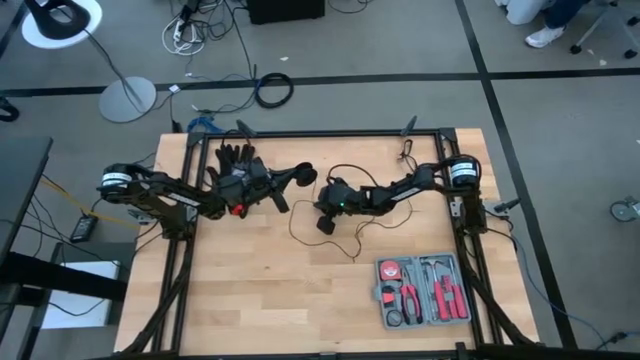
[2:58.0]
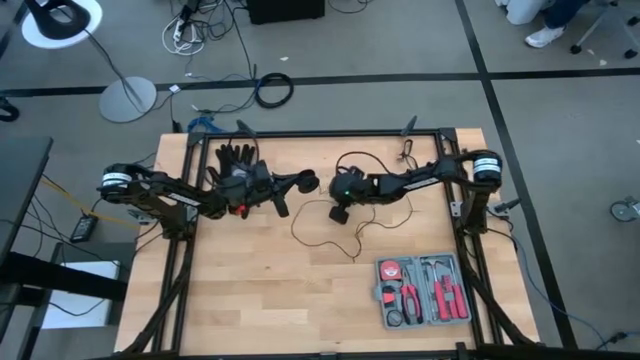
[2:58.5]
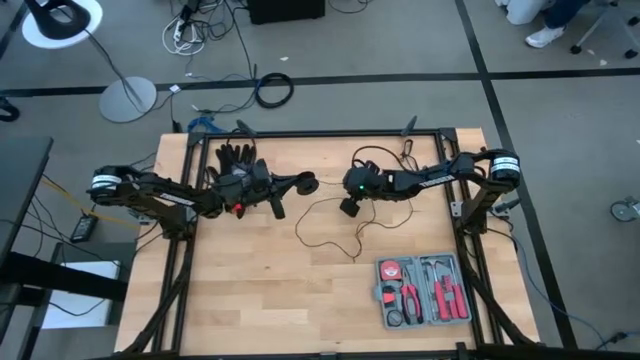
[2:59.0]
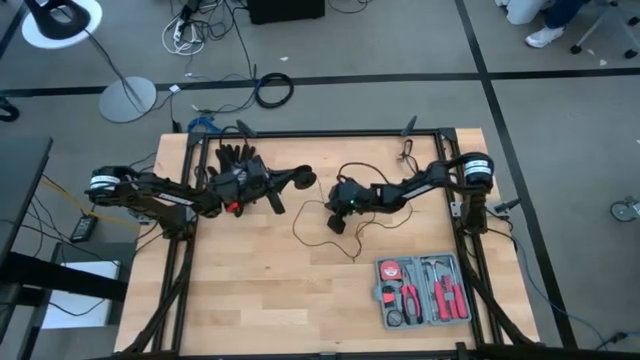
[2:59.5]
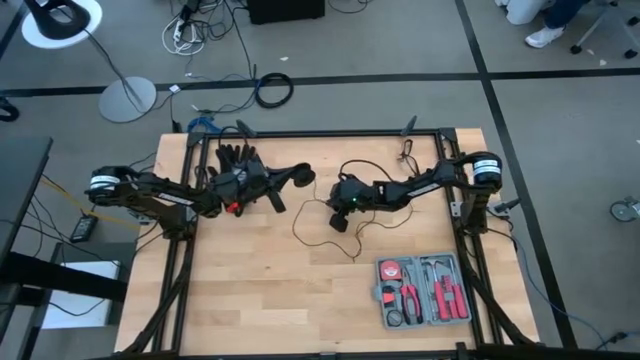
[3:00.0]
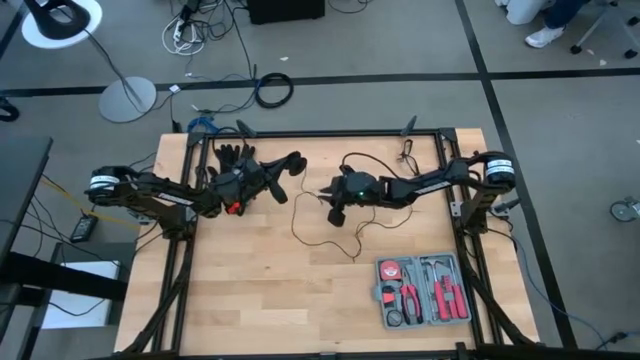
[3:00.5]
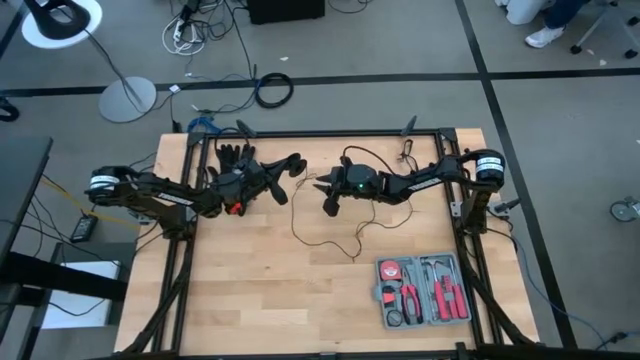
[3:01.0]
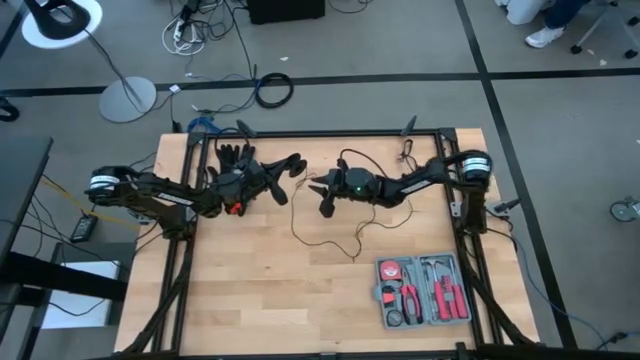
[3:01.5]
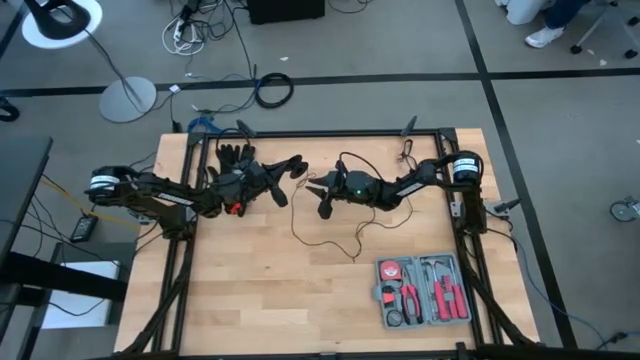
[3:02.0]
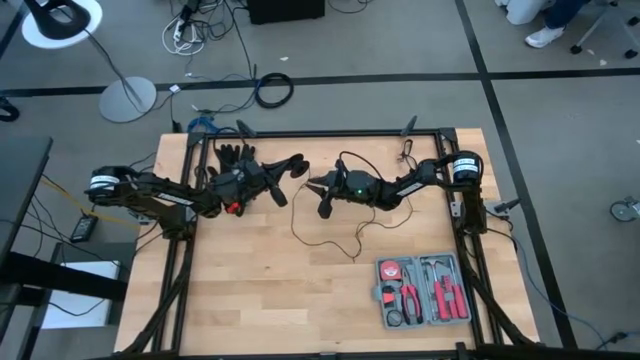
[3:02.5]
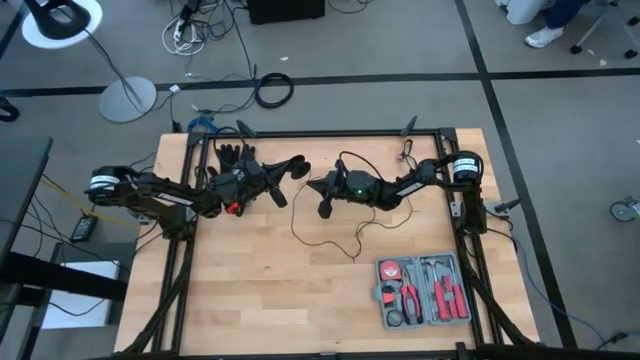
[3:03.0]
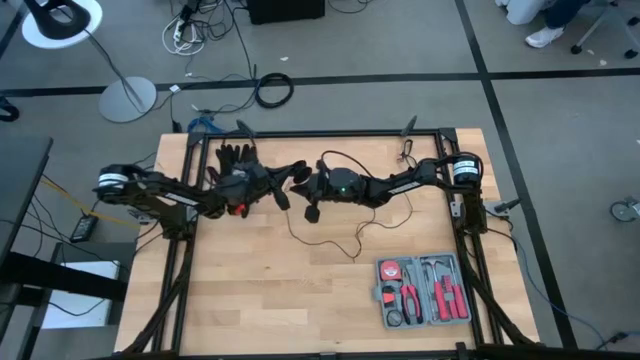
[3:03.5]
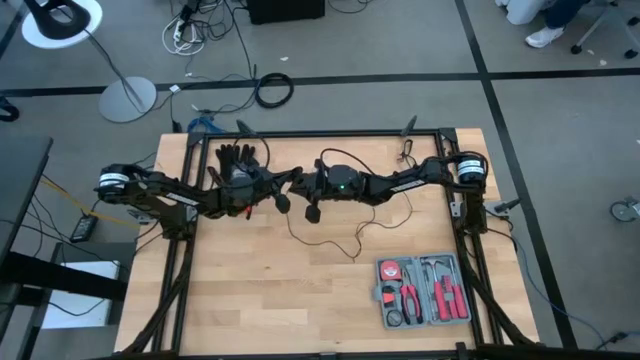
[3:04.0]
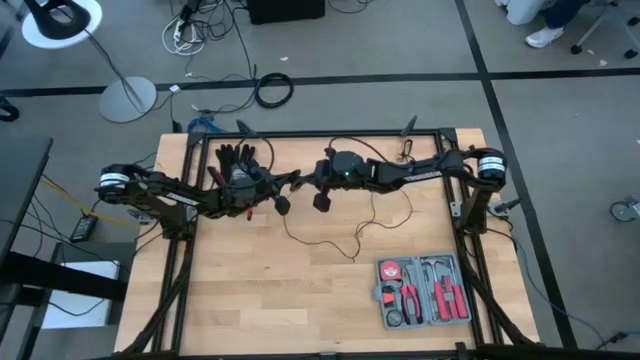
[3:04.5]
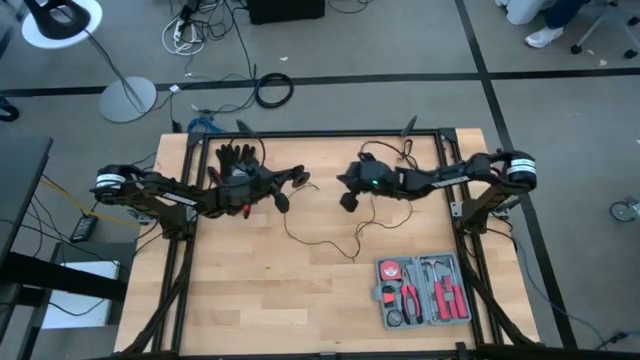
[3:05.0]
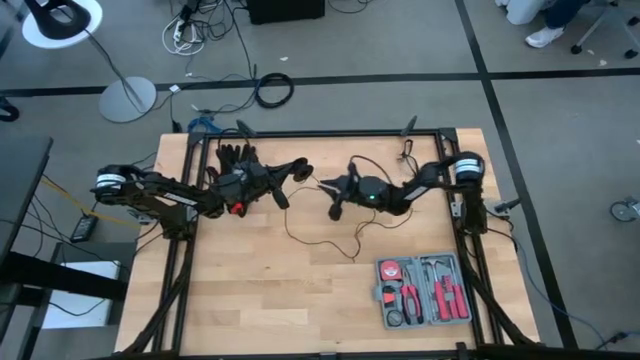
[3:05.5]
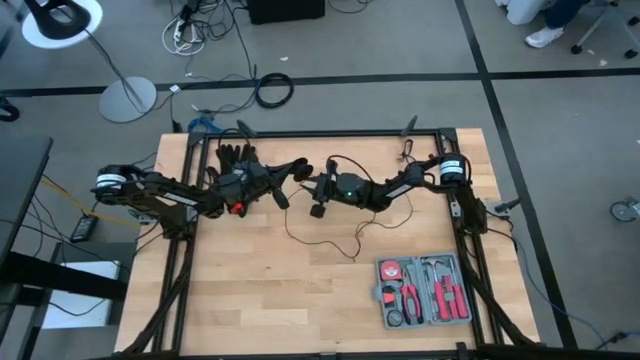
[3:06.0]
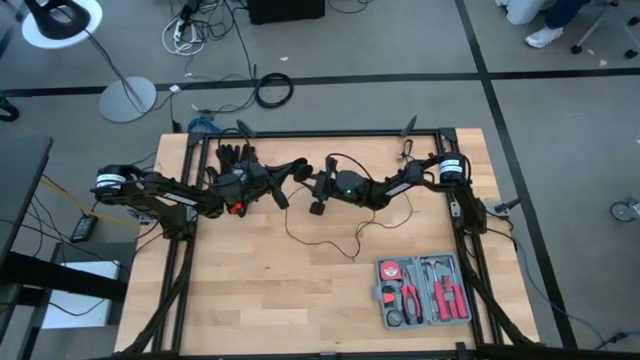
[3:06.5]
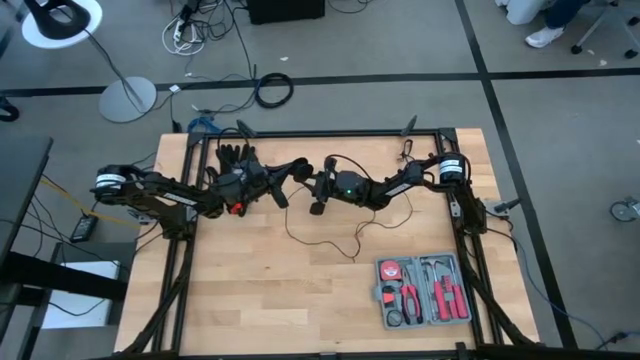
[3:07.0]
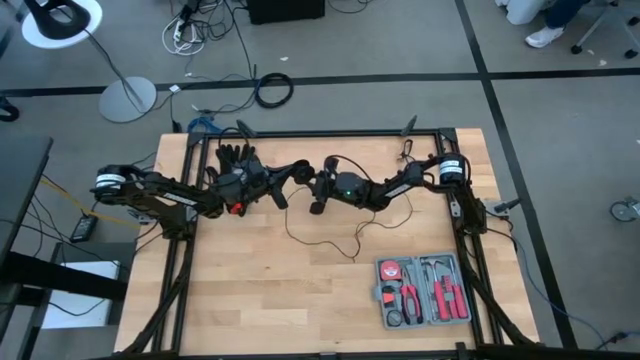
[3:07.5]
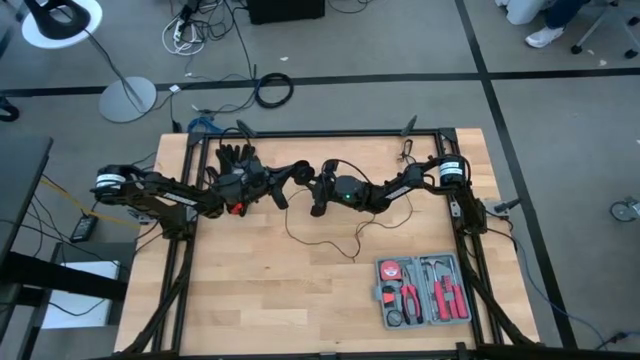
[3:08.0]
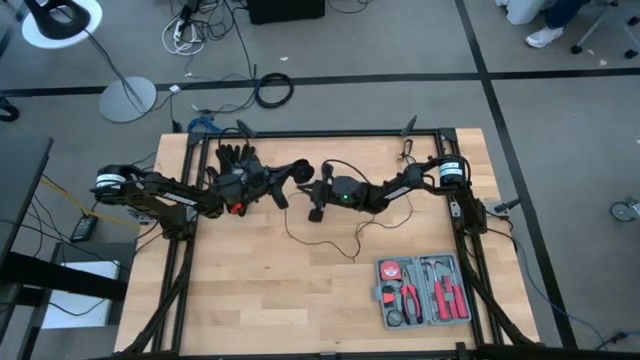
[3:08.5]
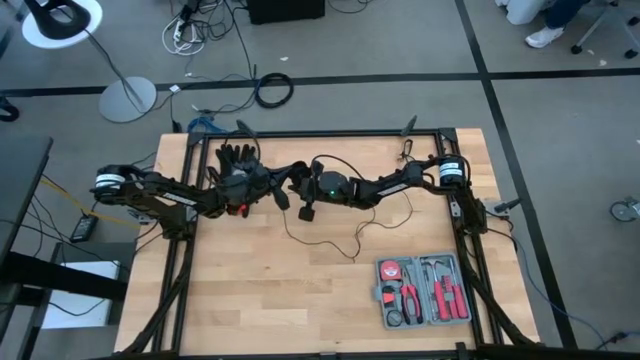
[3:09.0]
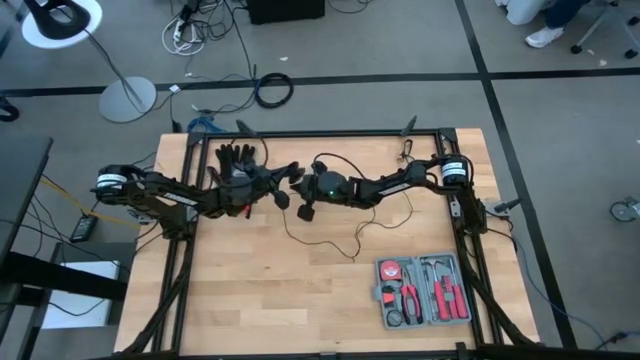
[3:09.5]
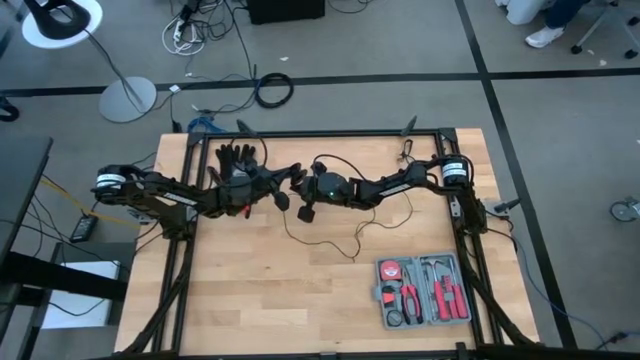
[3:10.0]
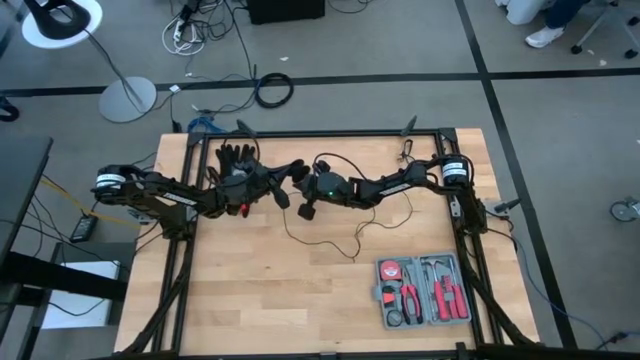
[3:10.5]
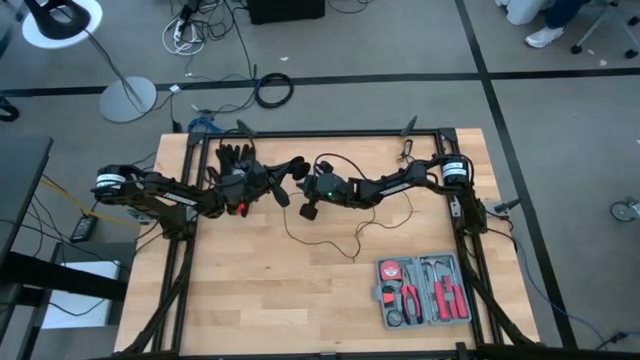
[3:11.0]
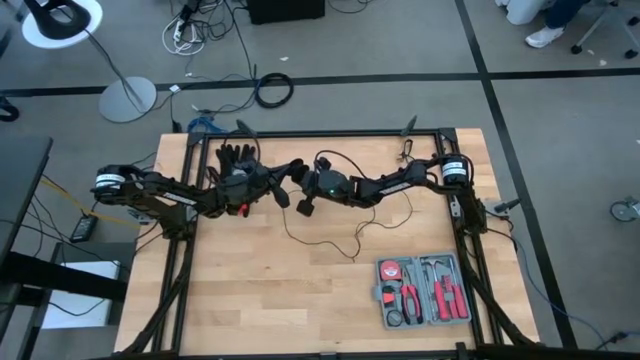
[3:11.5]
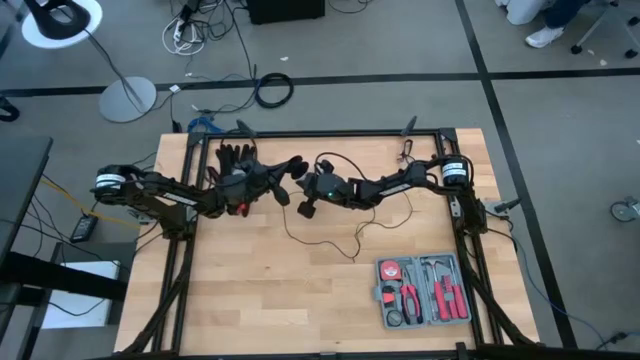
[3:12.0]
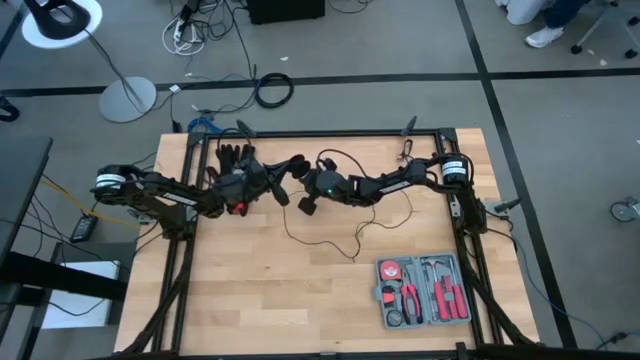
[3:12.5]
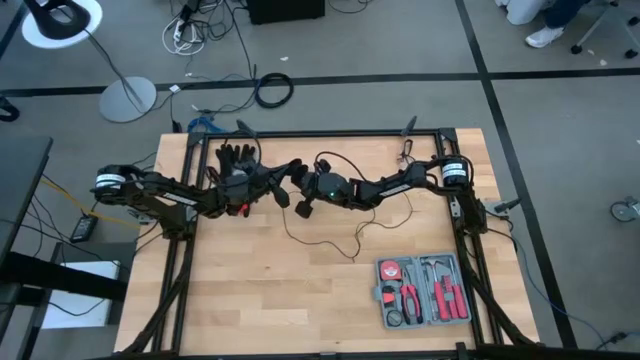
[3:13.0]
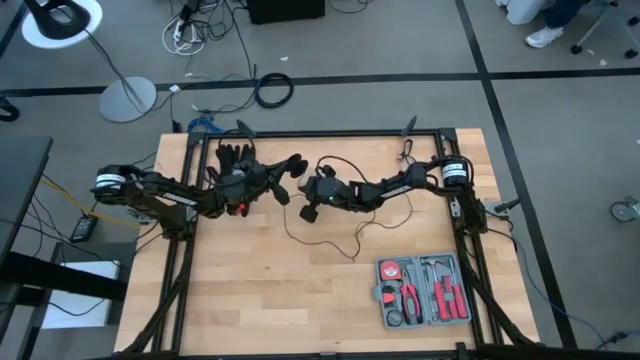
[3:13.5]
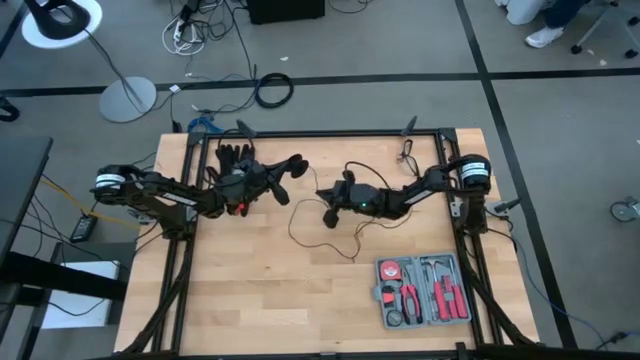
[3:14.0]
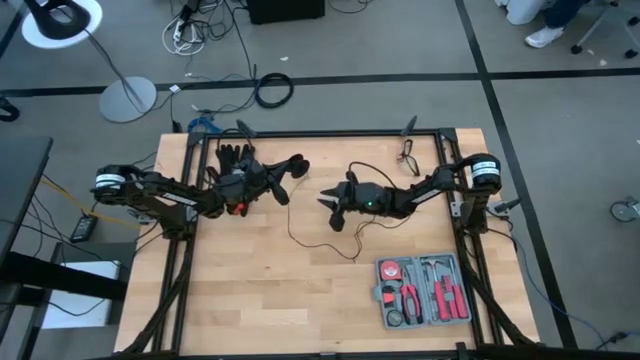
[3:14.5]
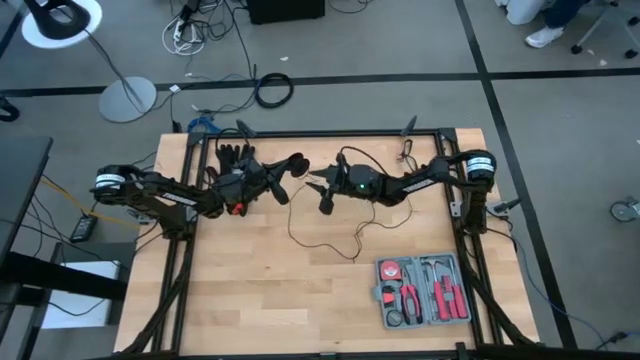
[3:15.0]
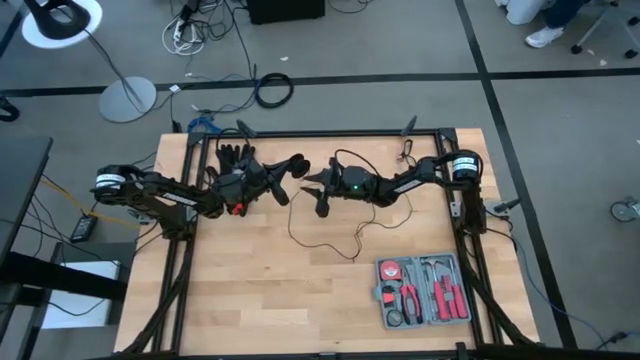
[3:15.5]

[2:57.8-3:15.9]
Task: Coil cords
Coil the black wire

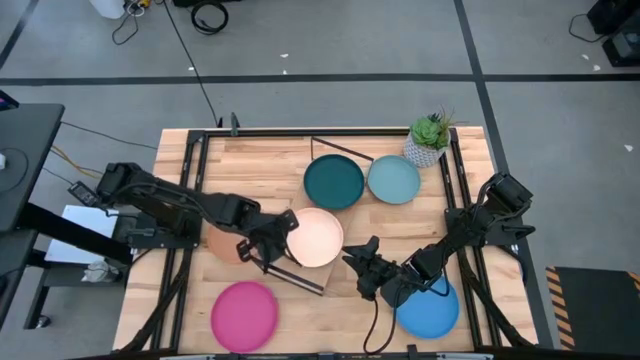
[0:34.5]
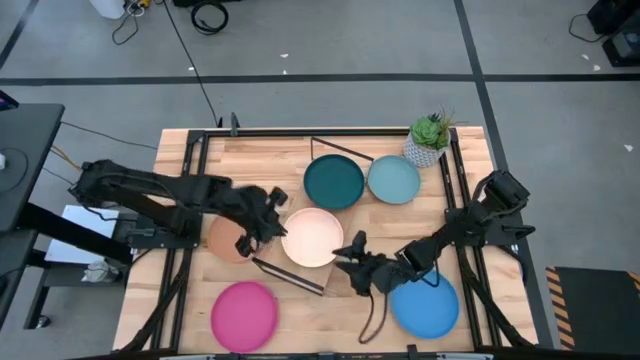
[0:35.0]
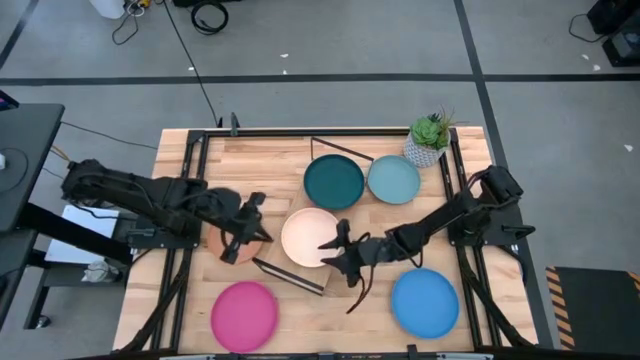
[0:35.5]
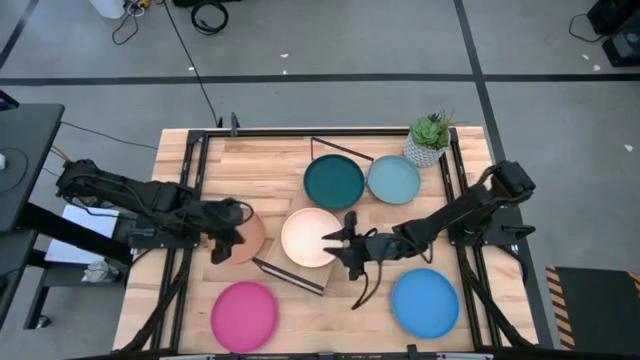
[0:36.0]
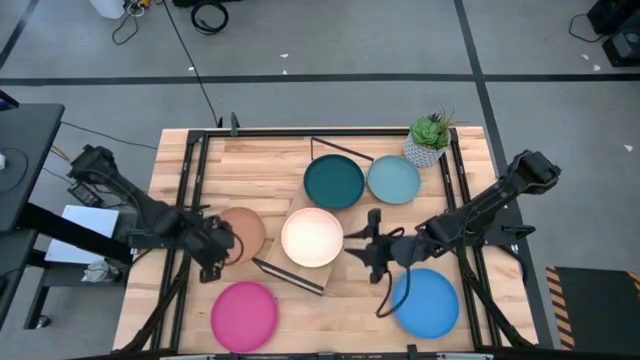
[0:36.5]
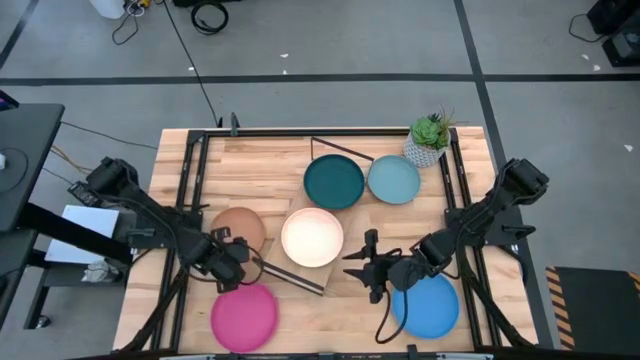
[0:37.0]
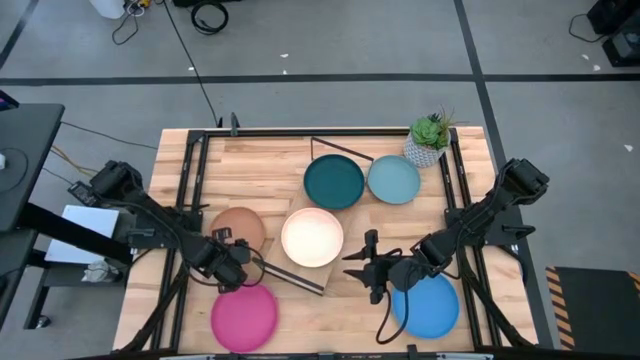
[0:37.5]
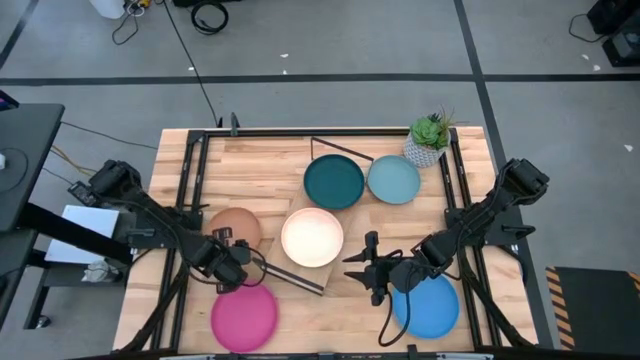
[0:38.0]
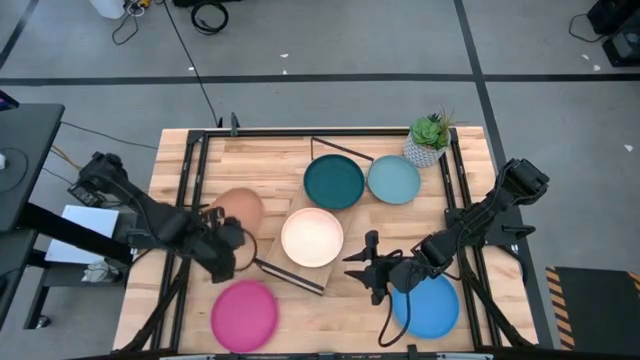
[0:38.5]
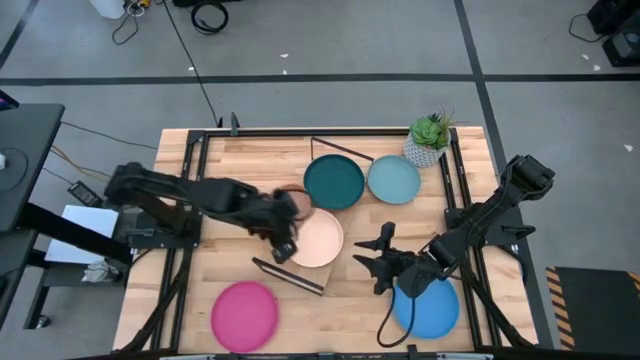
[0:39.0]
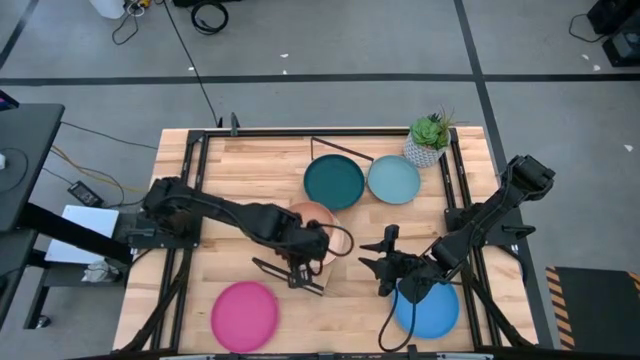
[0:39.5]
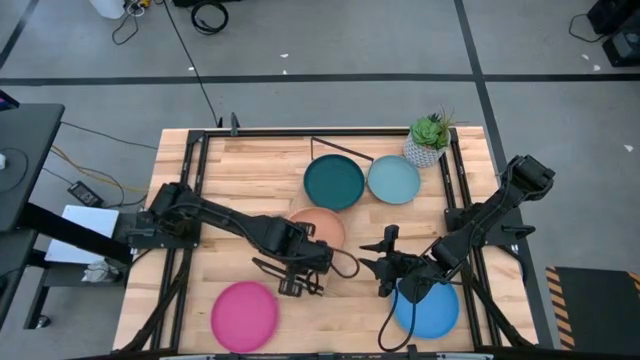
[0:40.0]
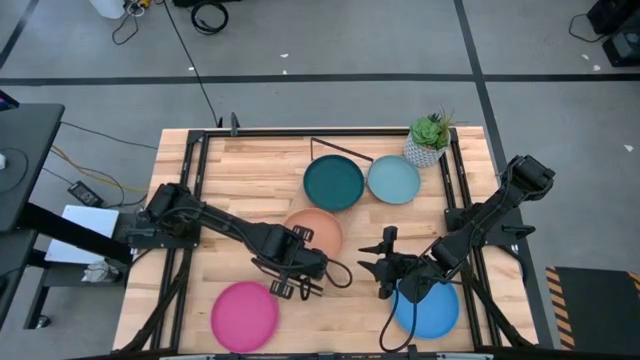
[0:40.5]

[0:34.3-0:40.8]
Task: Place and stack plates onto a shelf
Stack the brown plate on the light orange plate
